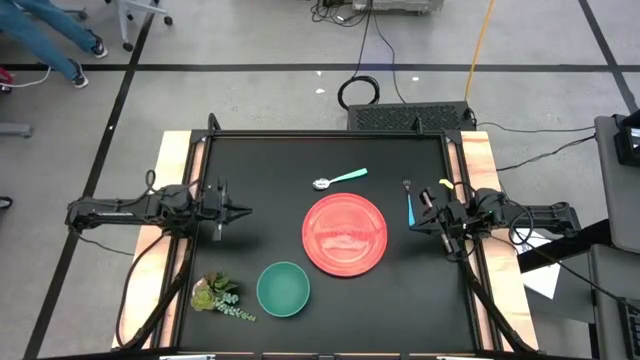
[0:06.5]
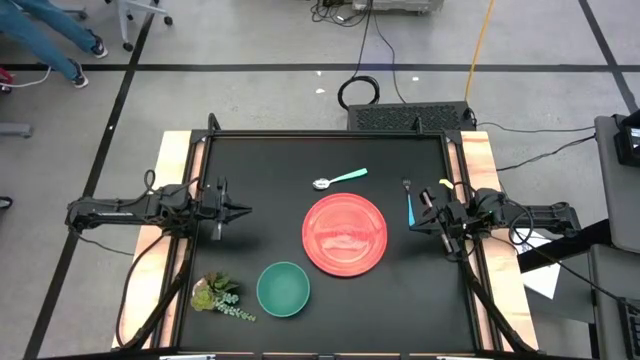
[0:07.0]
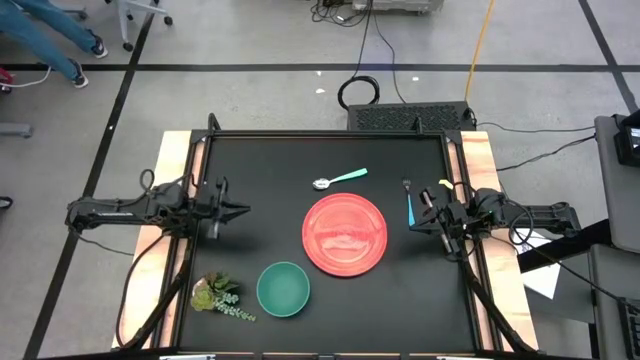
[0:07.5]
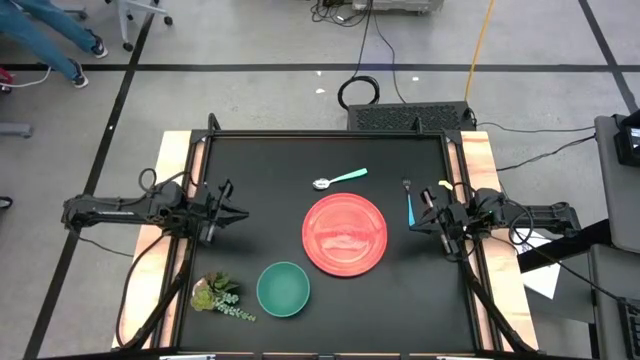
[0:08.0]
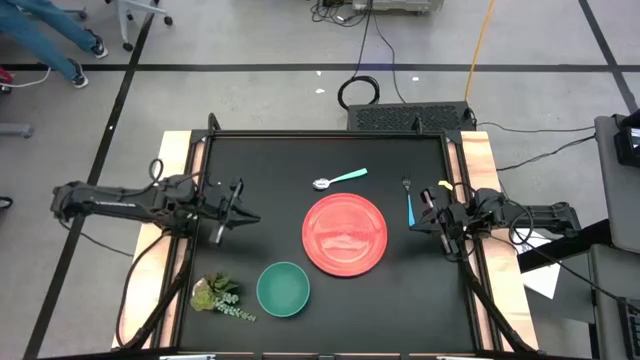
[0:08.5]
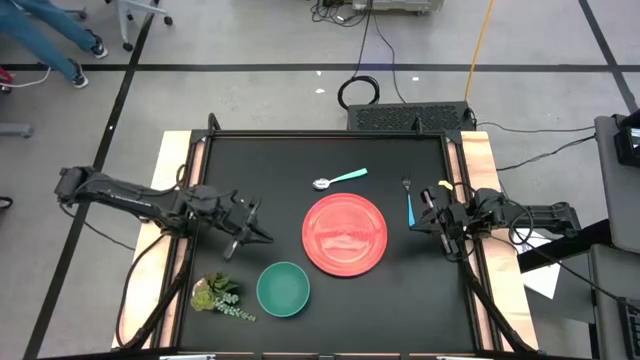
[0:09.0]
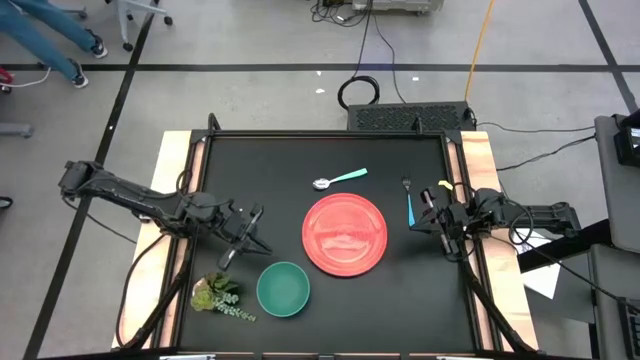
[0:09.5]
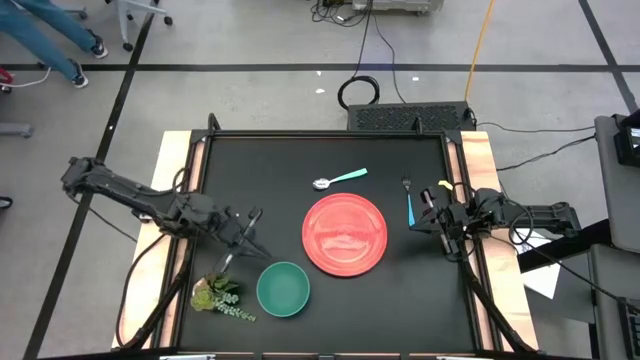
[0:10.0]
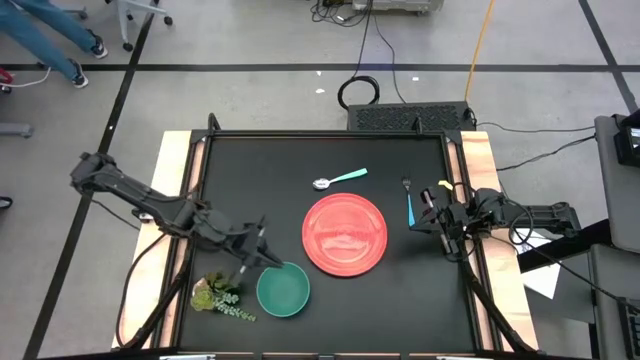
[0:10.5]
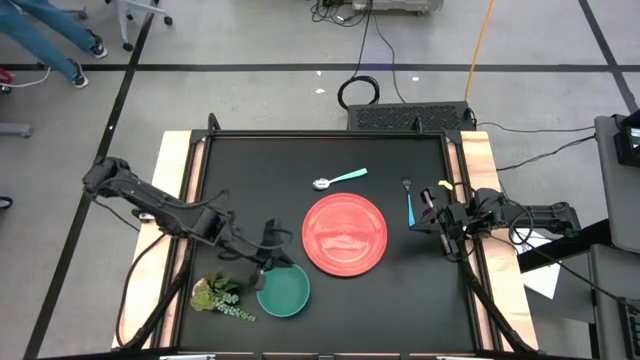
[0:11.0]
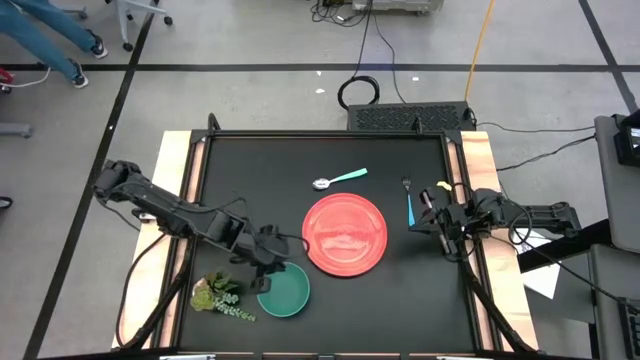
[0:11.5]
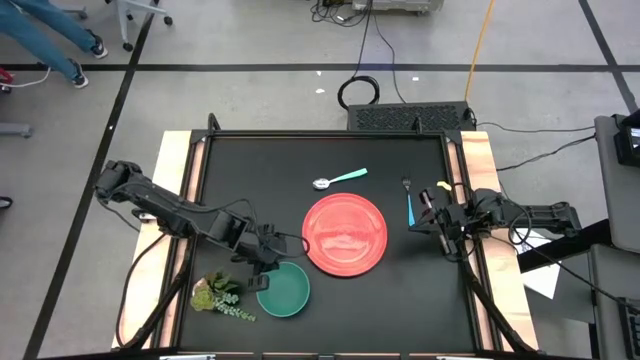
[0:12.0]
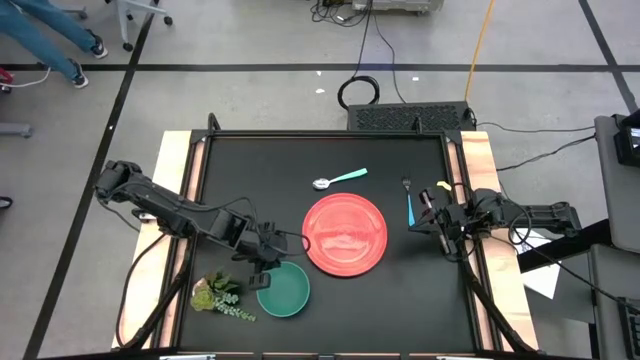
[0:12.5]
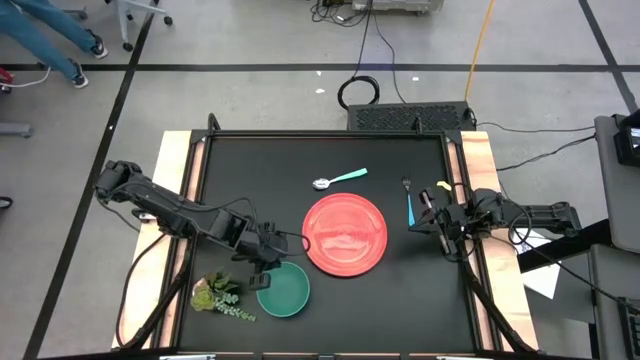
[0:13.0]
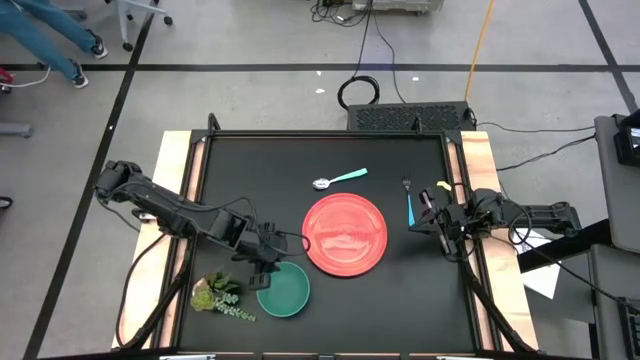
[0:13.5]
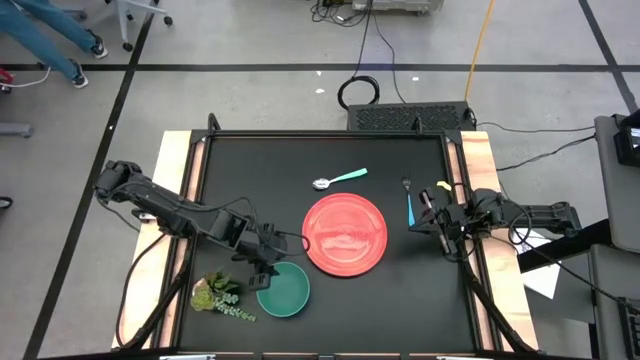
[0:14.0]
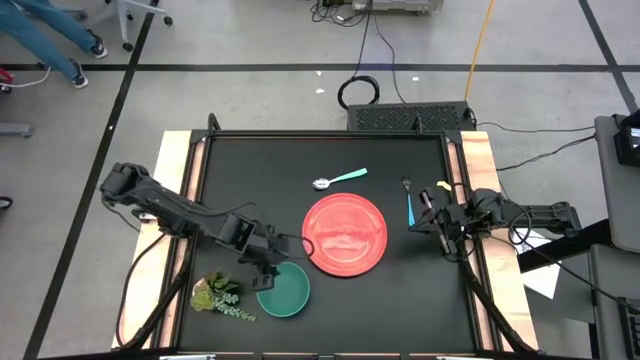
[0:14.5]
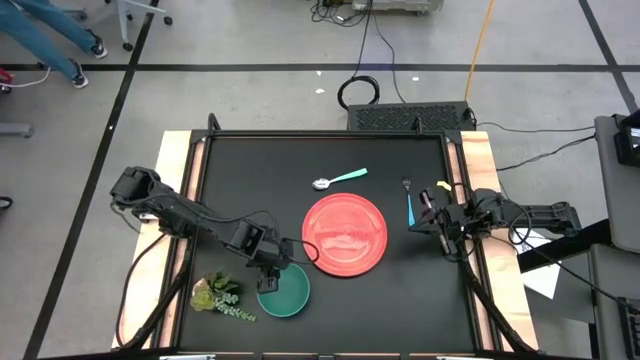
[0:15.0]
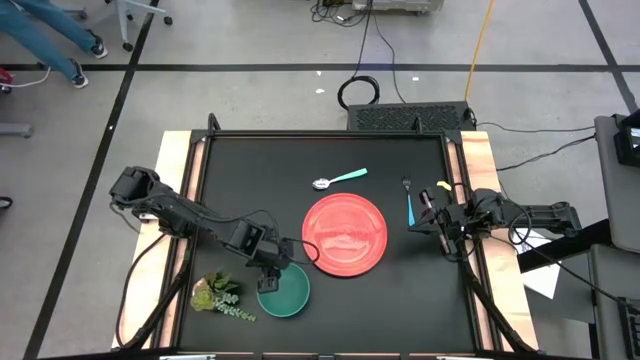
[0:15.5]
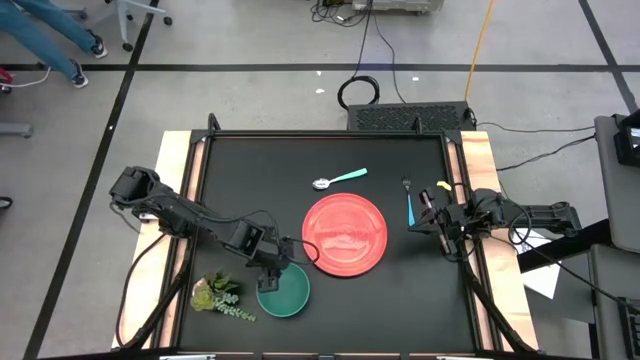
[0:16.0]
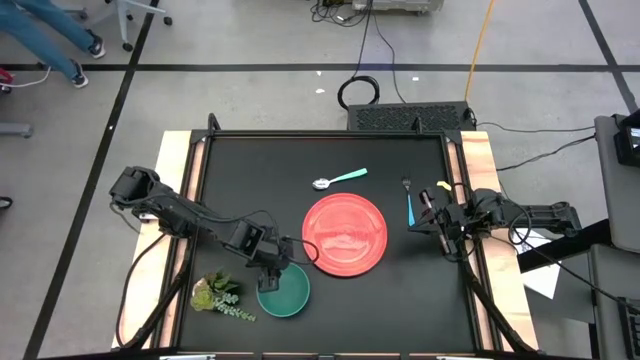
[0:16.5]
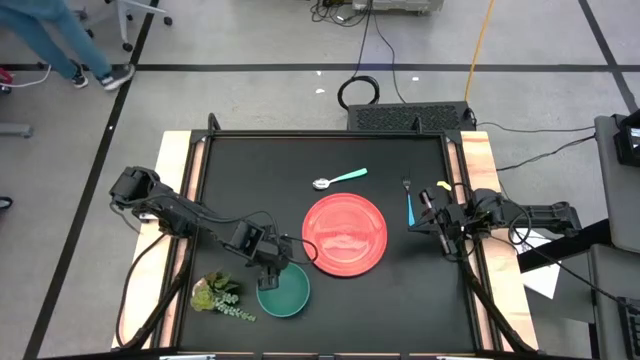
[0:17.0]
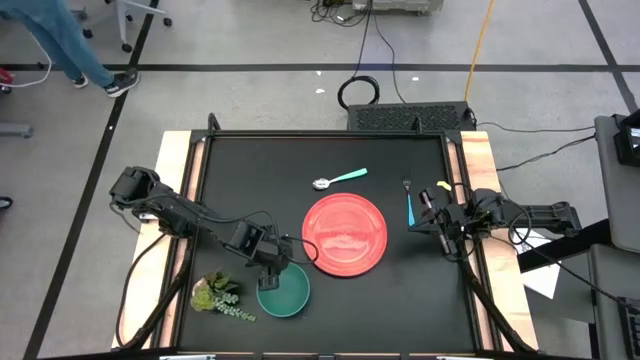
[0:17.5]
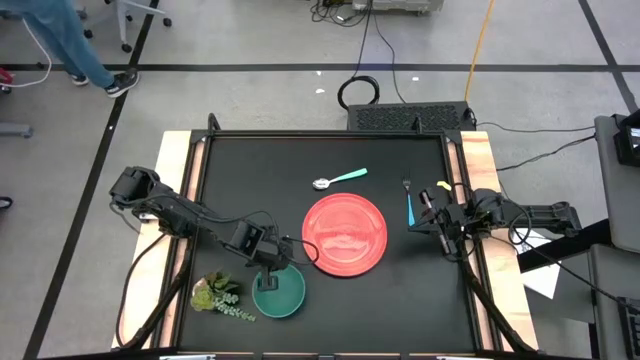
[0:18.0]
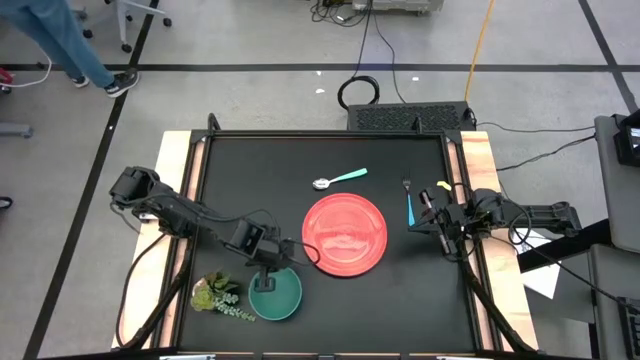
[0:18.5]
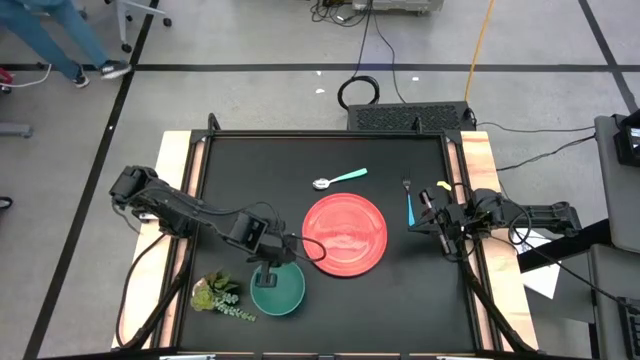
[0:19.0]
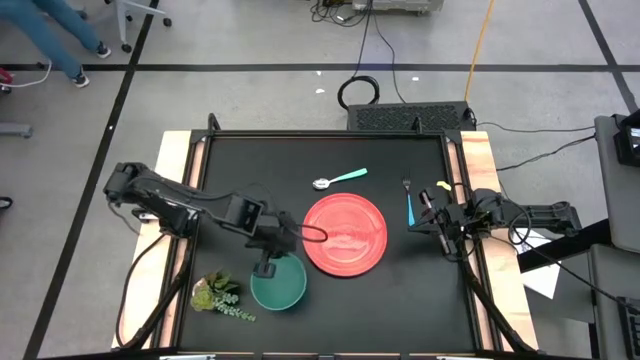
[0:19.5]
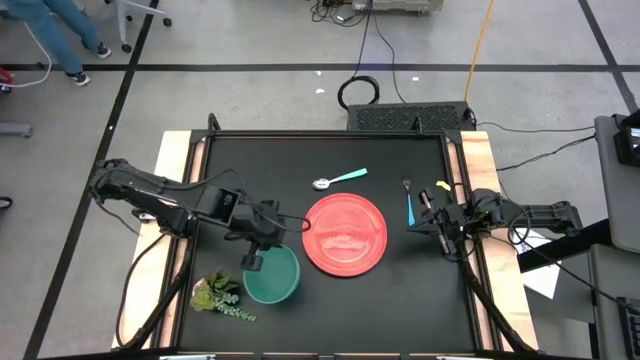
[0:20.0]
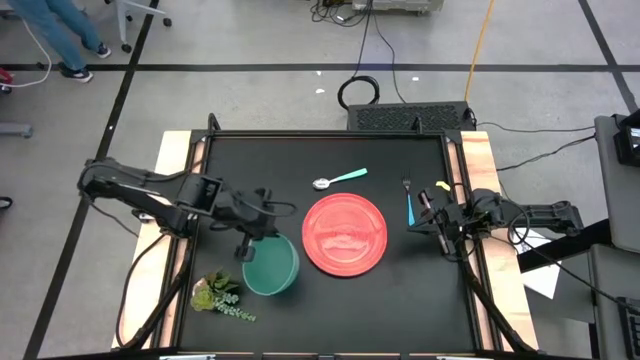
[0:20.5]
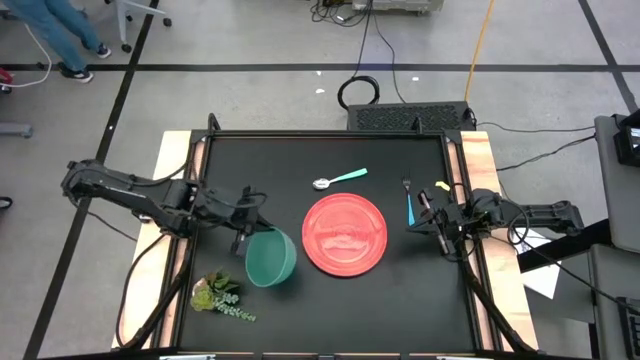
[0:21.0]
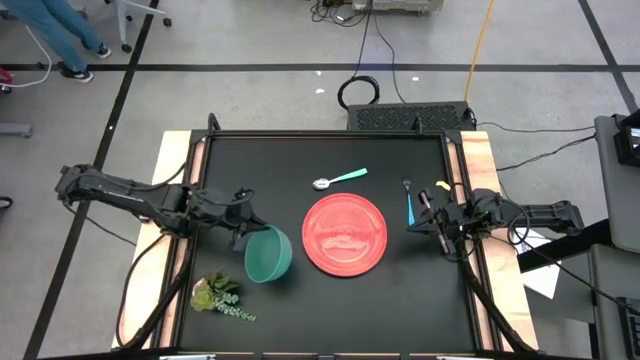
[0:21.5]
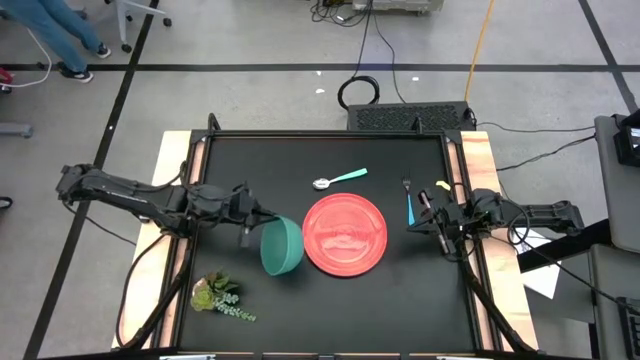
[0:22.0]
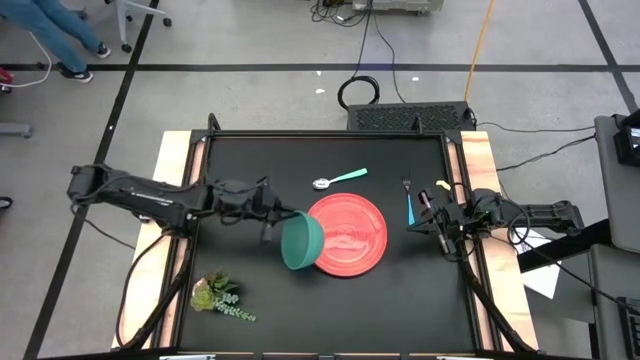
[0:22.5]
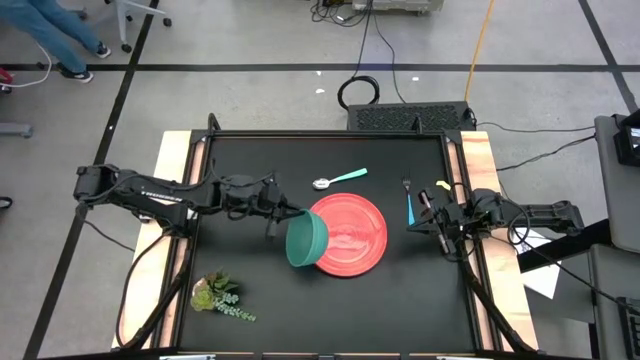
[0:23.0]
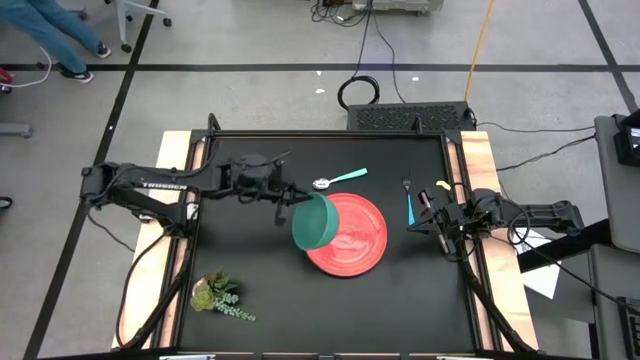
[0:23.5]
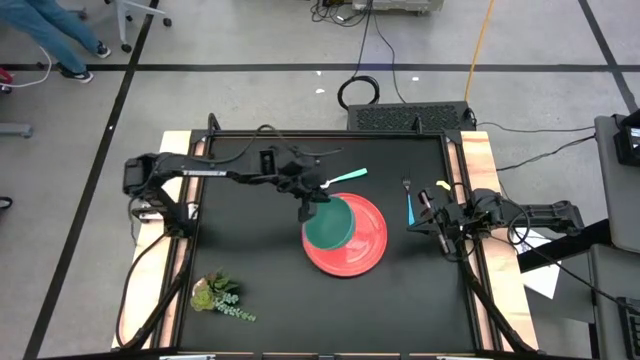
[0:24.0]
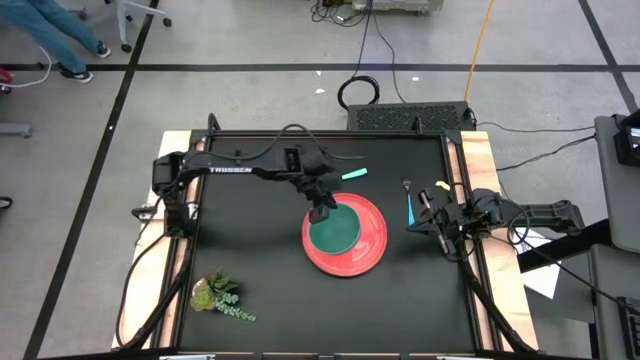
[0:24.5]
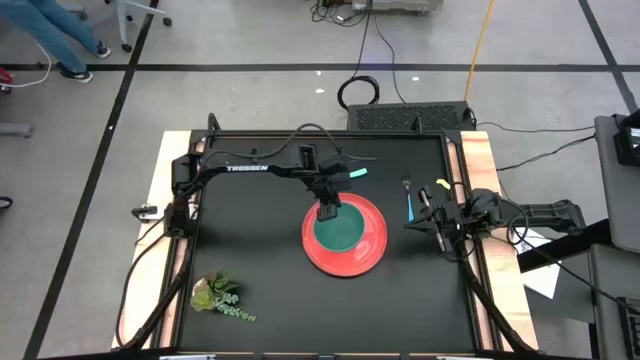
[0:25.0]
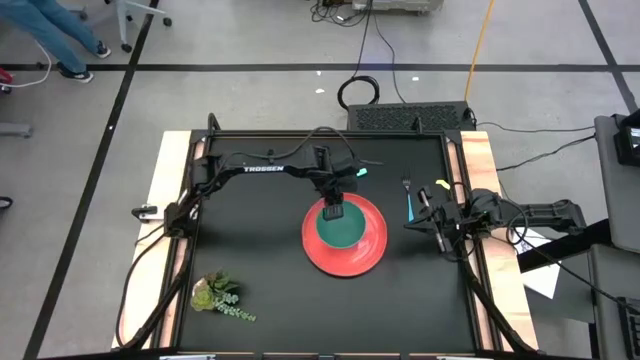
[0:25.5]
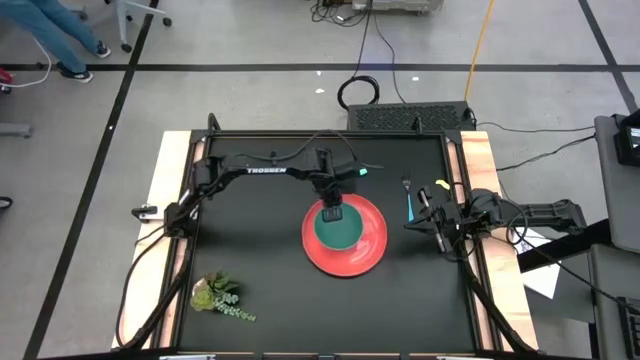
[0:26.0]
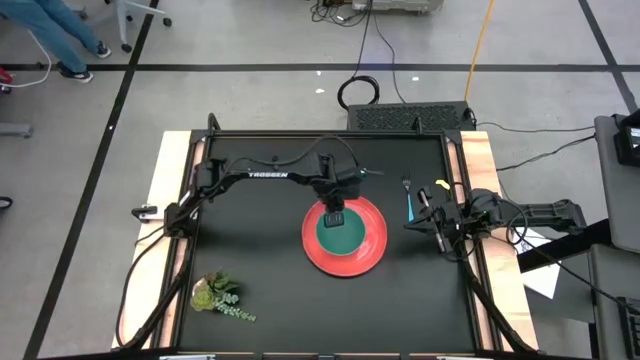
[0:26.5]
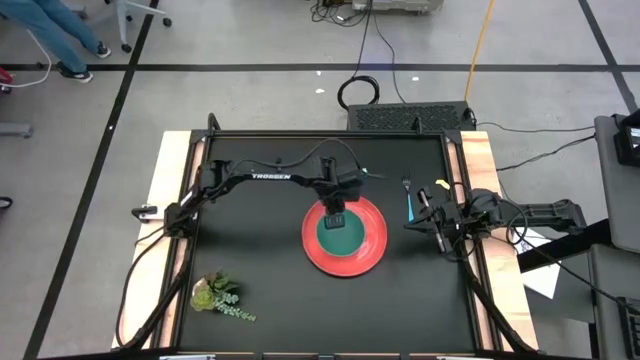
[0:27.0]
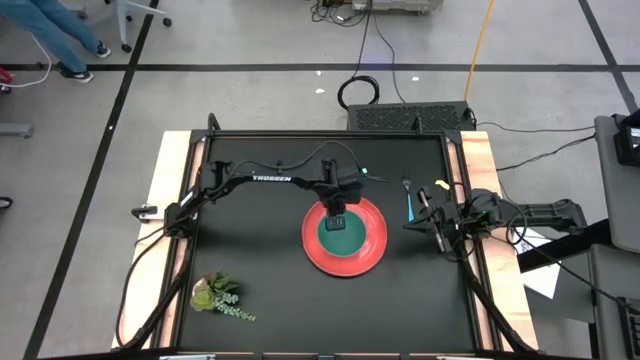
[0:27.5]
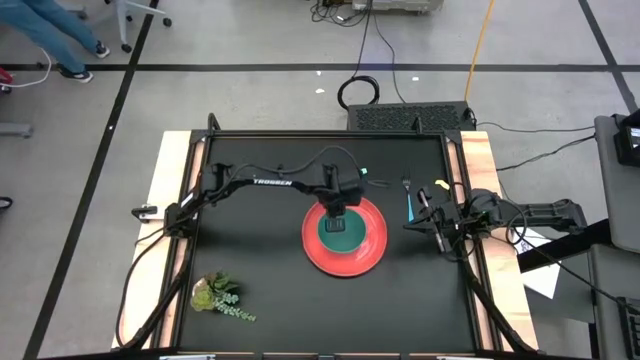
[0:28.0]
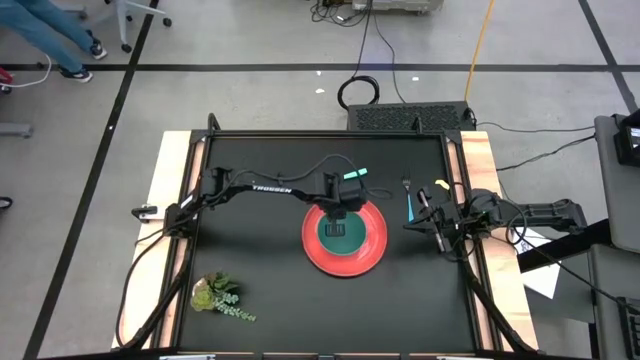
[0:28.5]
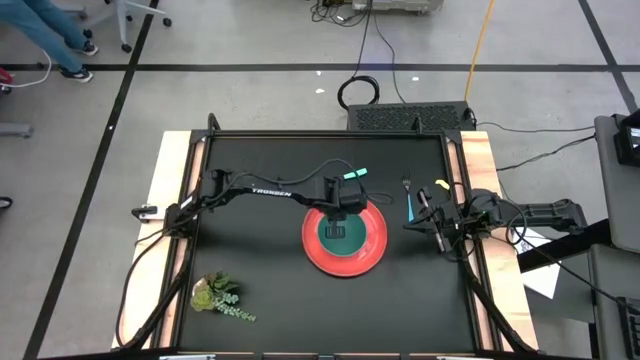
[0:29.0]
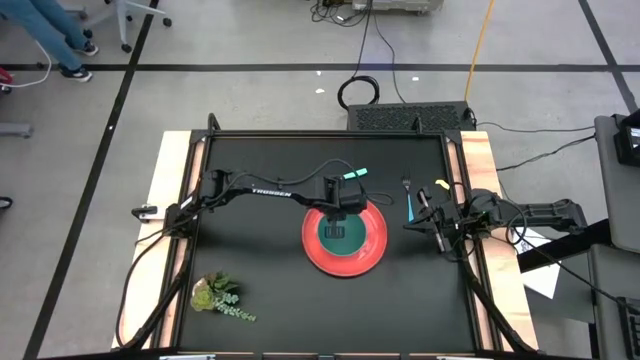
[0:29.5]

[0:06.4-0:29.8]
Task: Set table place
Put the green bowl on the orange plate
